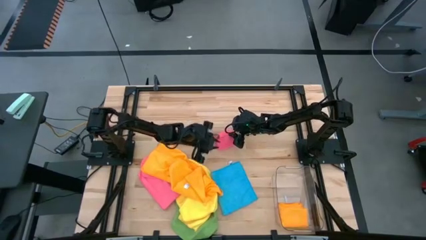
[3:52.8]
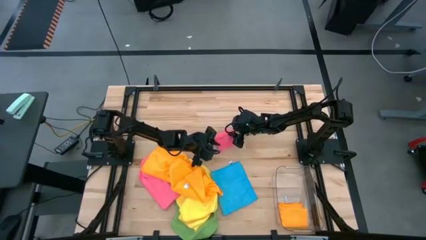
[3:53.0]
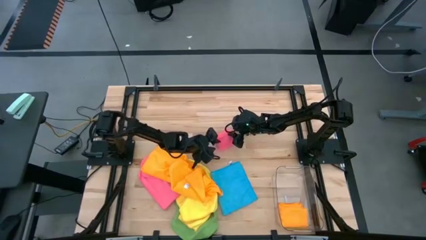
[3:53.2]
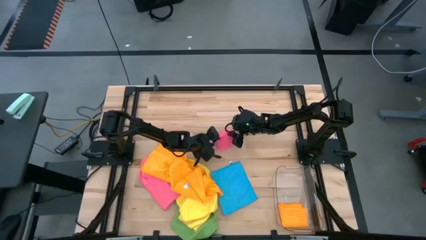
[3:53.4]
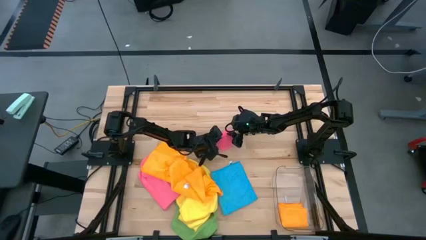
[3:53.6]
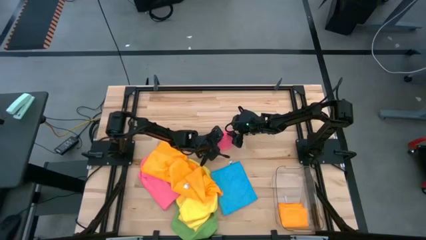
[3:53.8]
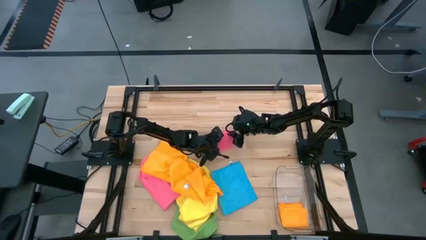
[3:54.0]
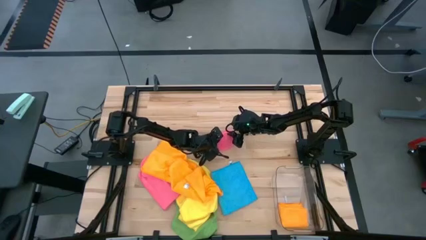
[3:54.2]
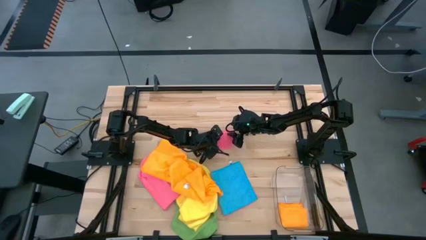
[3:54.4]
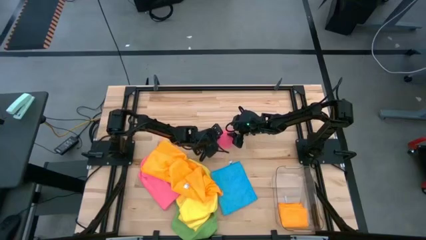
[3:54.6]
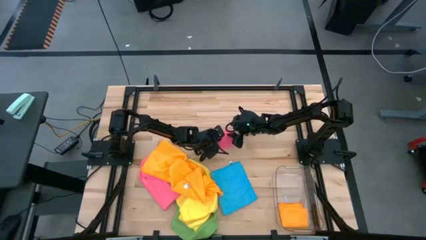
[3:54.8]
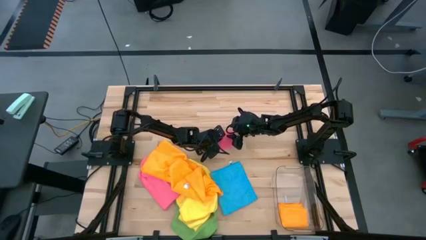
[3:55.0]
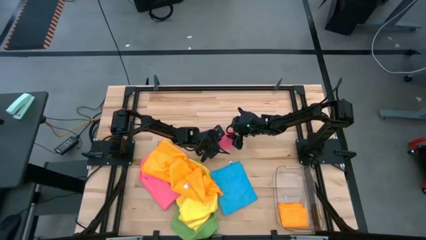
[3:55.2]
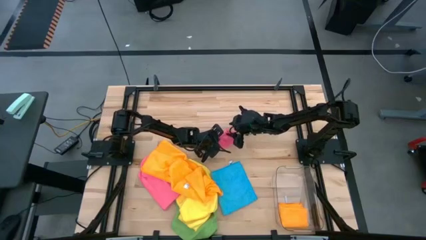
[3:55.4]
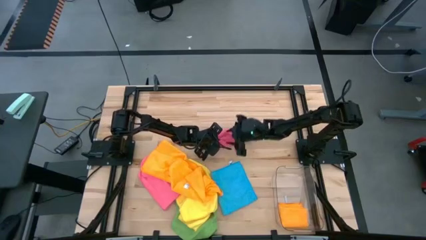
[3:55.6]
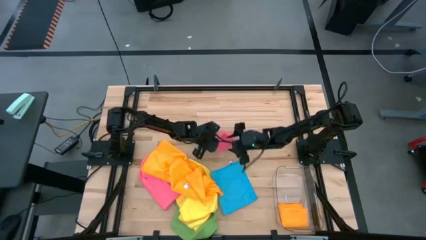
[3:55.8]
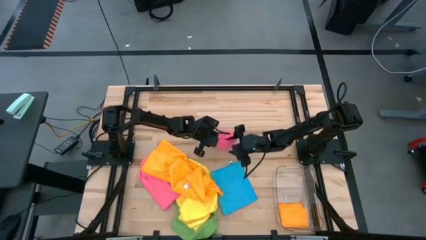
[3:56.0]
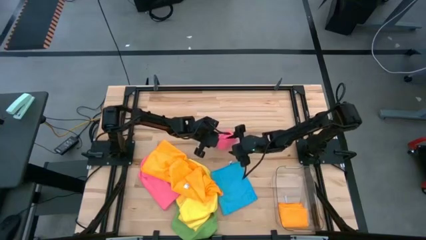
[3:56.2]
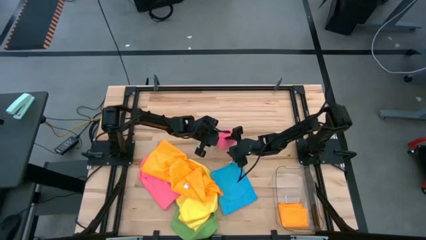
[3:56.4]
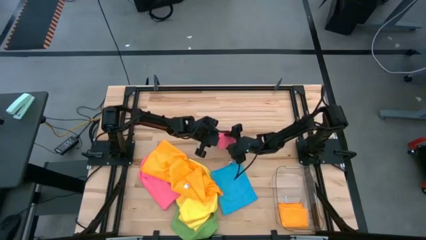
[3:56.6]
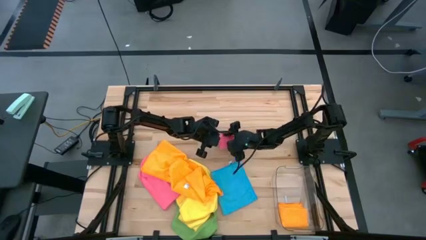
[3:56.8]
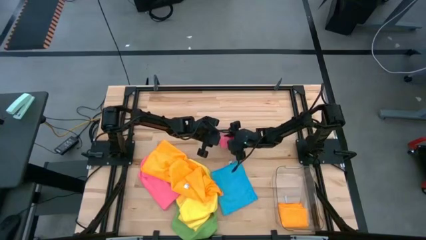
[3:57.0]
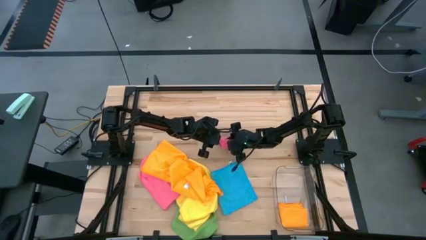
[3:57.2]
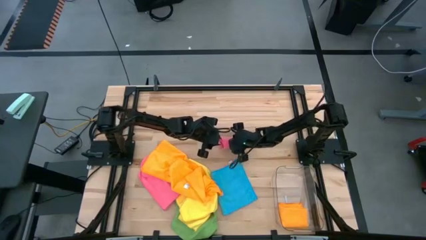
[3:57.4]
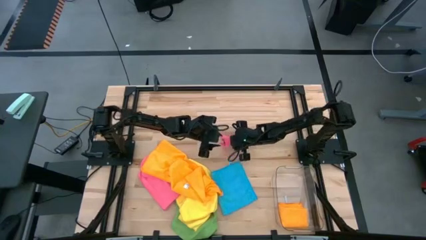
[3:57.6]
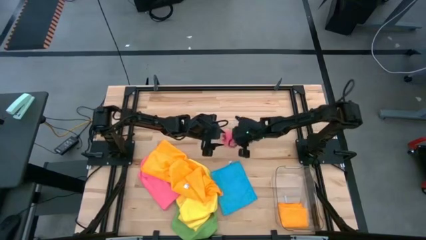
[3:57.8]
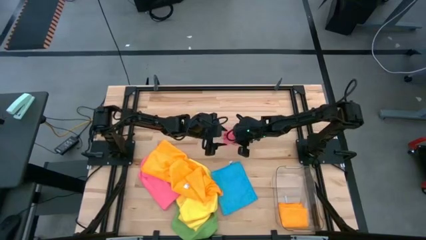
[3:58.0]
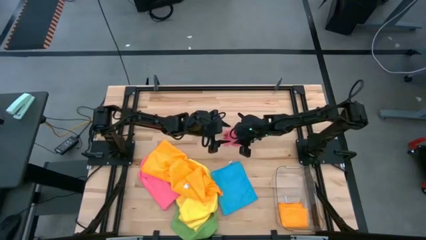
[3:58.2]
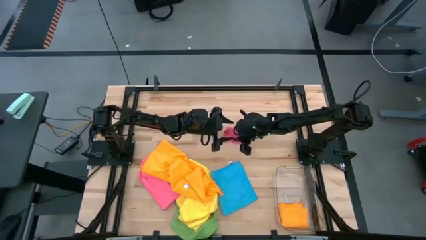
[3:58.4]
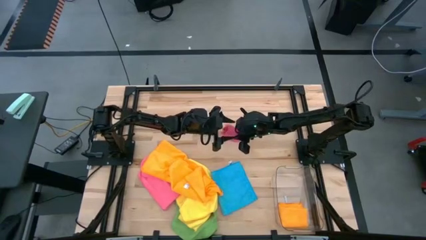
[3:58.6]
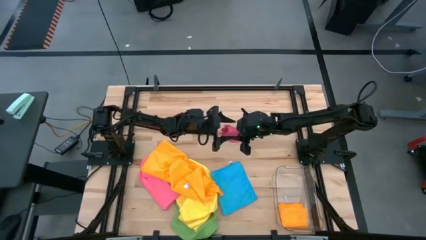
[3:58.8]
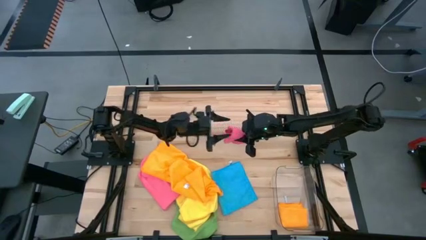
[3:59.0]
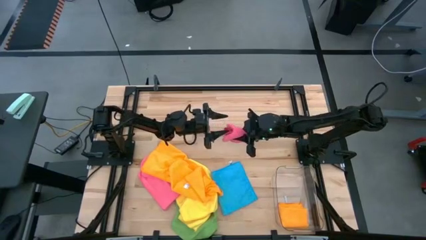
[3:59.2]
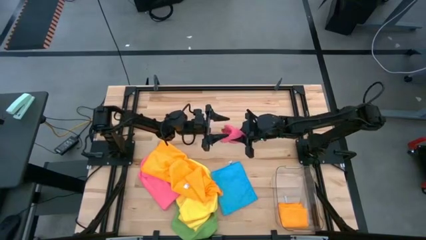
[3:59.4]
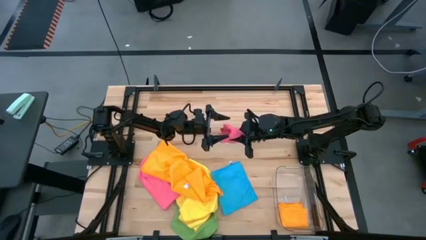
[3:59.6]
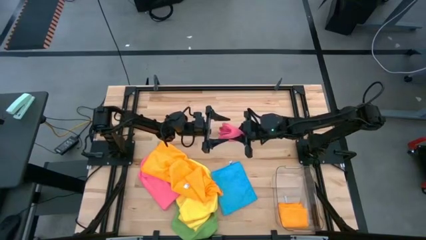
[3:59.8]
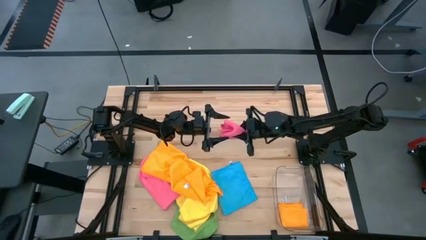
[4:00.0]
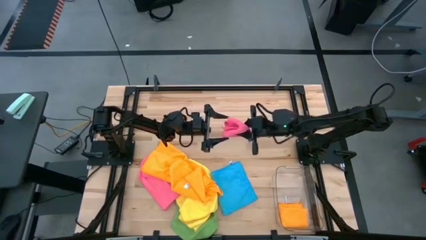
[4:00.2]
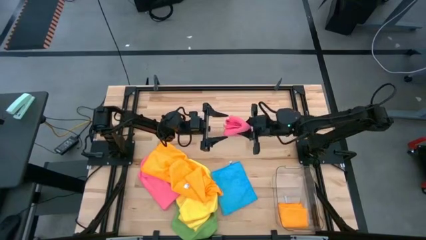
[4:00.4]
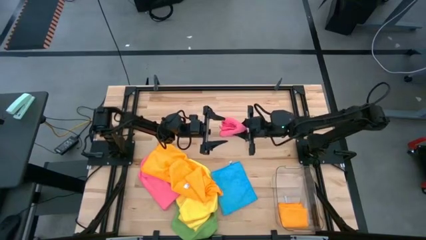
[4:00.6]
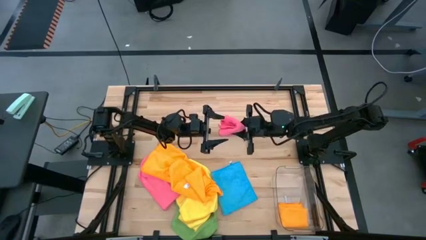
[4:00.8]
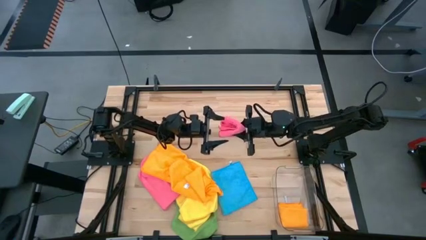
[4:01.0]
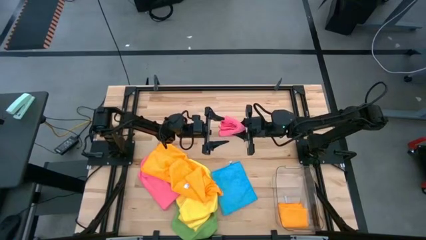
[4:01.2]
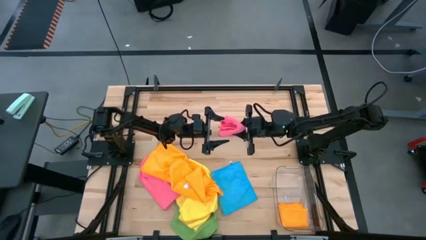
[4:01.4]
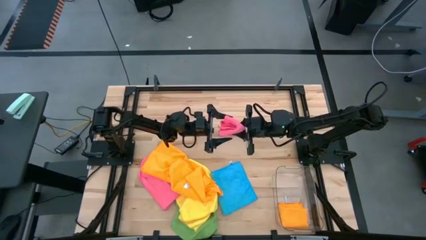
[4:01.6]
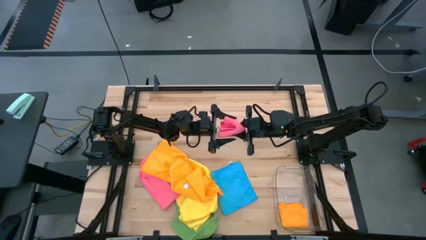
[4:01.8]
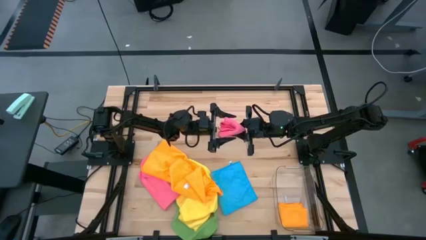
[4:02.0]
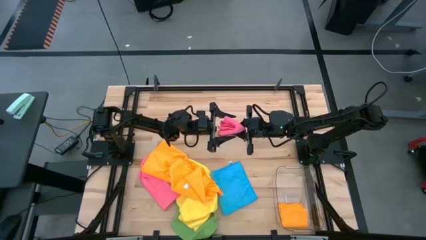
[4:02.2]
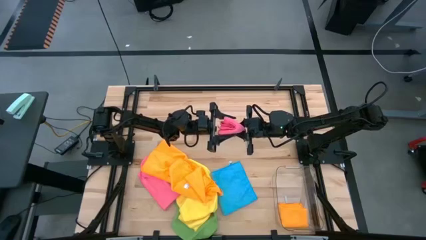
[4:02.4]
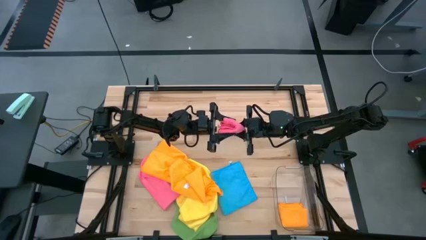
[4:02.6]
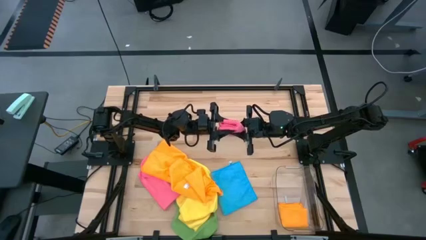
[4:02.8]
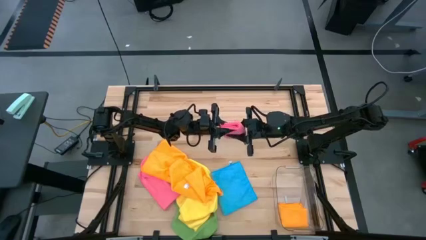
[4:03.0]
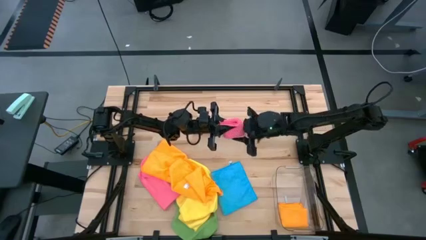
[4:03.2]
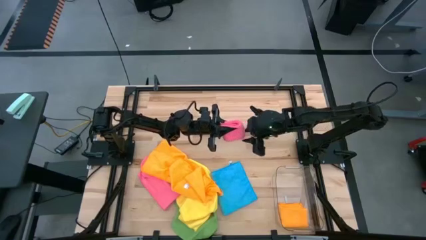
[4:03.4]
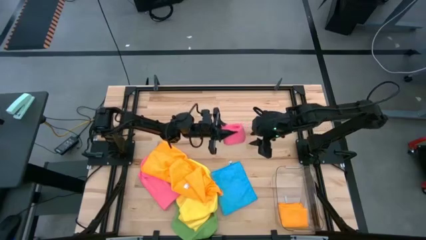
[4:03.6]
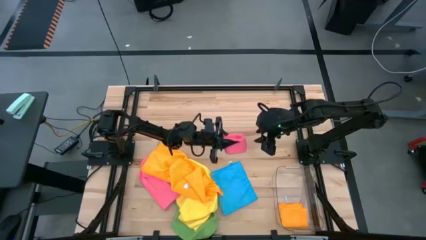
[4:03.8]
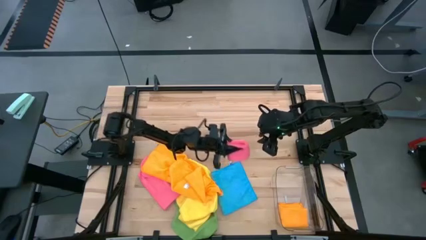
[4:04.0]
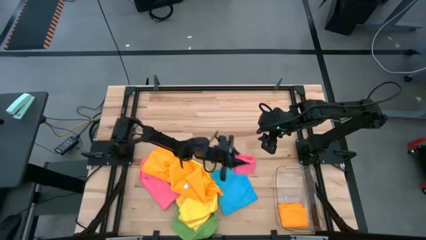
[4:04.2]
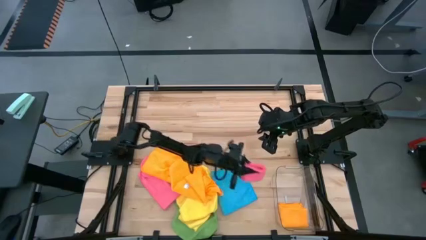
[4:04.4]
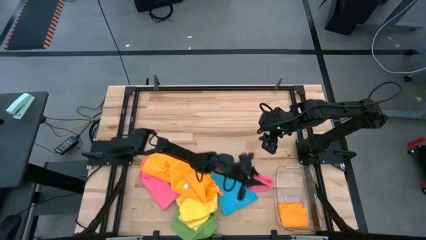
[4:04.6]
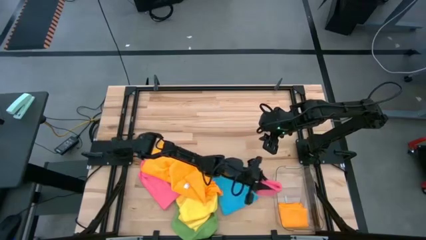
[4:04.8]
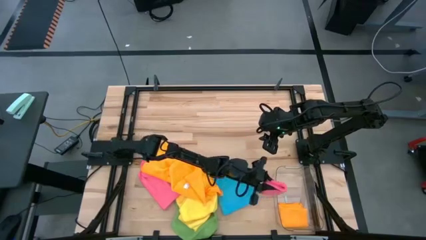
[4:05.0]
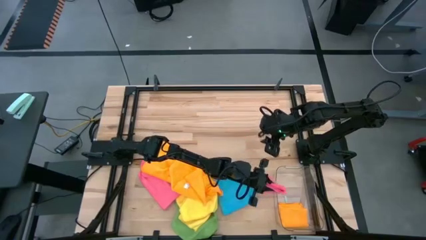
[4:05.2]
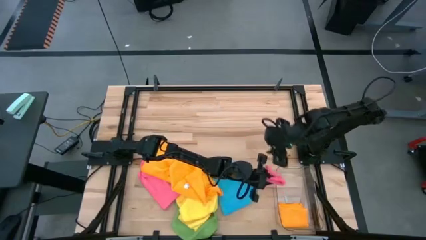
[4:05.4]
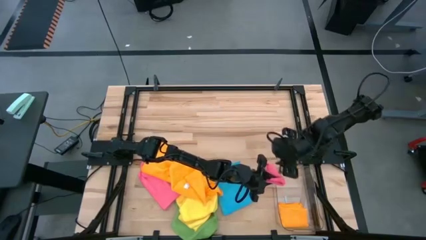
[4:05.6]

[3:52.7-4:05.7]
Task: Fold microfiber towels
Put the folded pink towel into the transparent bin

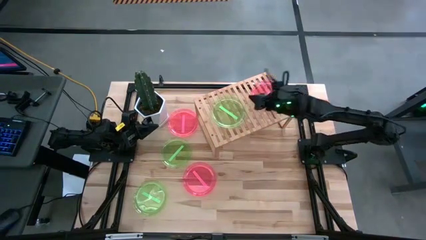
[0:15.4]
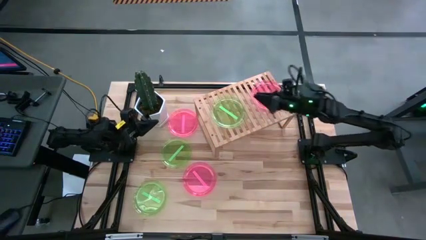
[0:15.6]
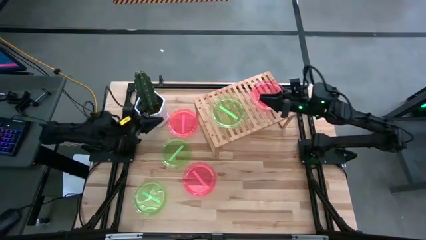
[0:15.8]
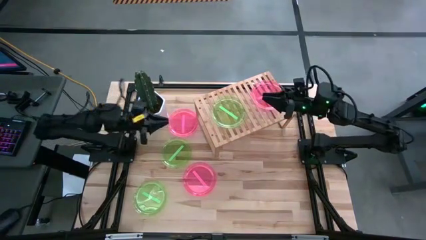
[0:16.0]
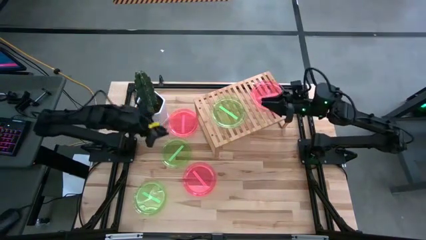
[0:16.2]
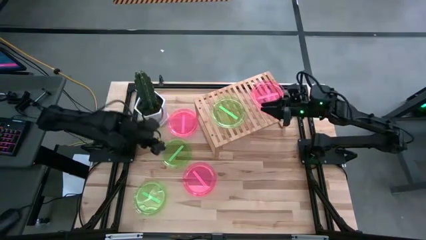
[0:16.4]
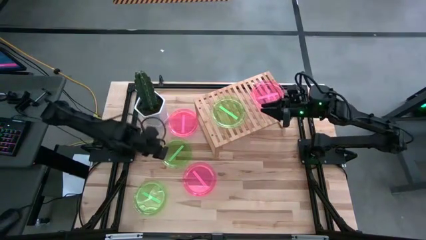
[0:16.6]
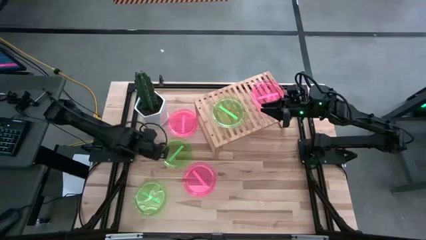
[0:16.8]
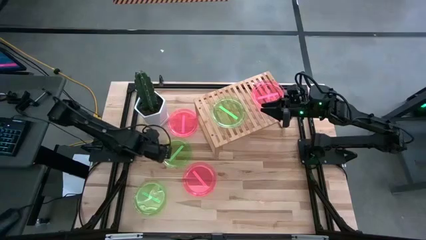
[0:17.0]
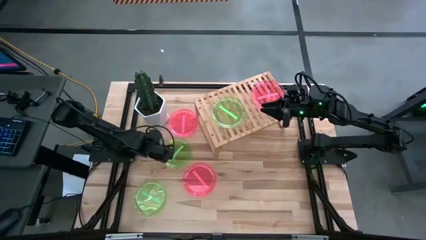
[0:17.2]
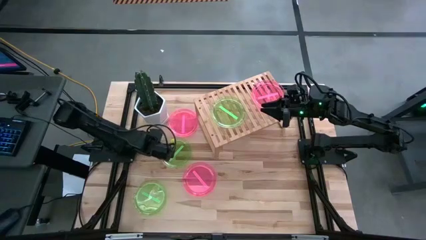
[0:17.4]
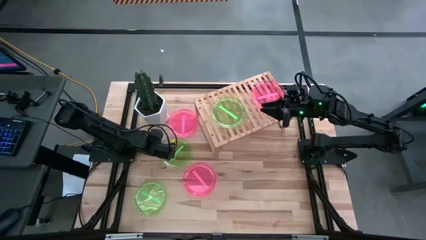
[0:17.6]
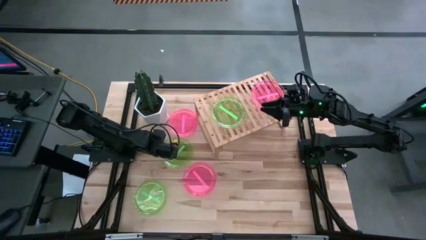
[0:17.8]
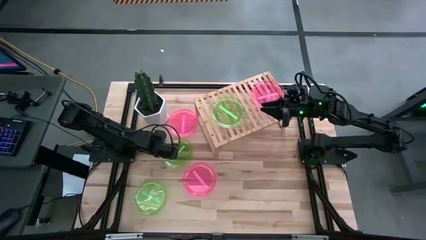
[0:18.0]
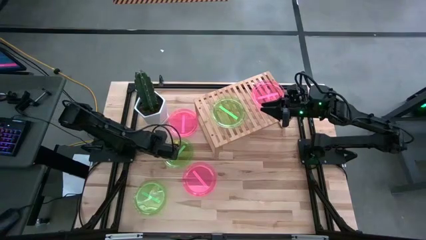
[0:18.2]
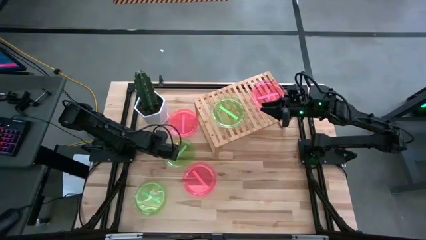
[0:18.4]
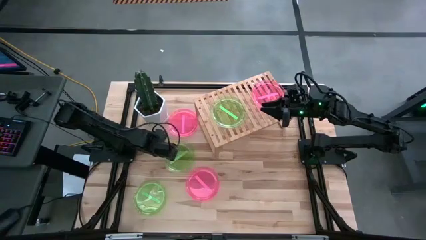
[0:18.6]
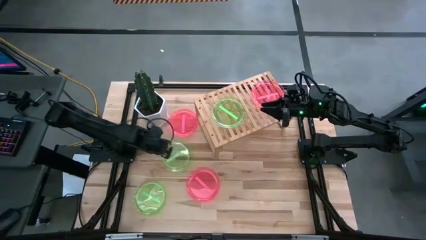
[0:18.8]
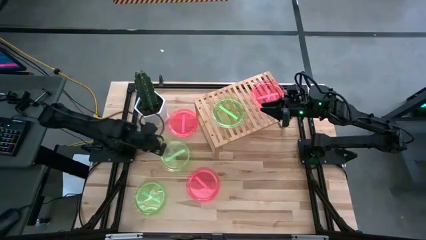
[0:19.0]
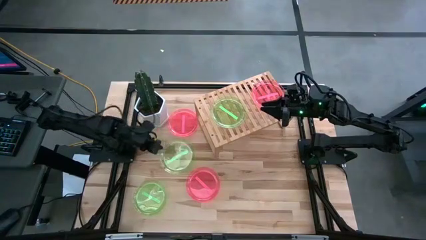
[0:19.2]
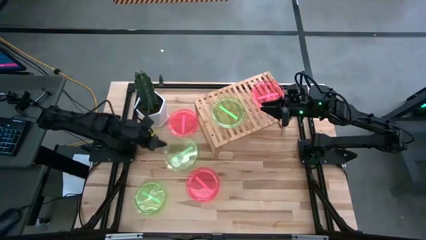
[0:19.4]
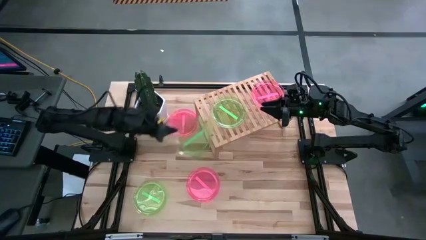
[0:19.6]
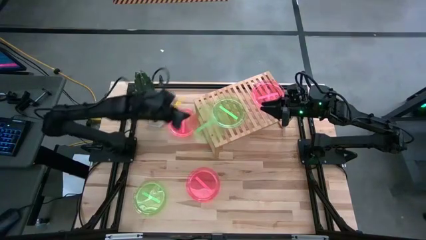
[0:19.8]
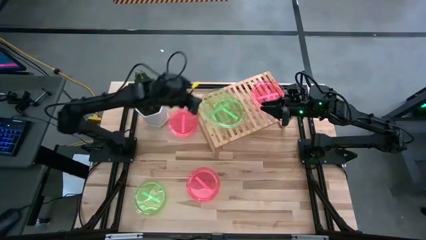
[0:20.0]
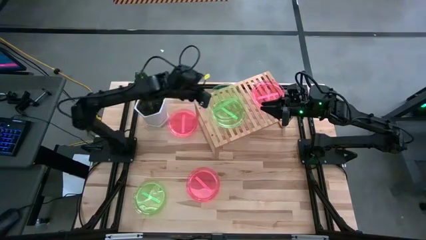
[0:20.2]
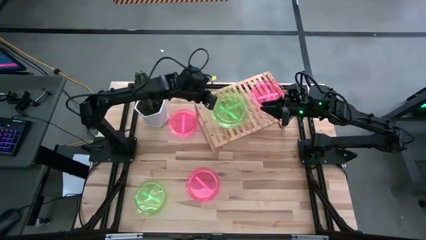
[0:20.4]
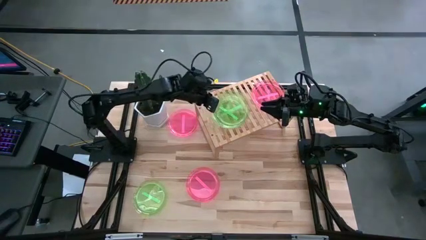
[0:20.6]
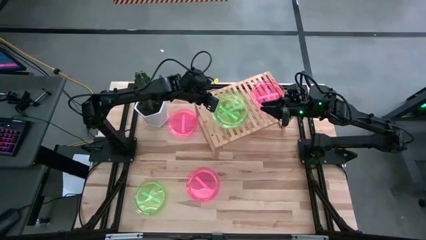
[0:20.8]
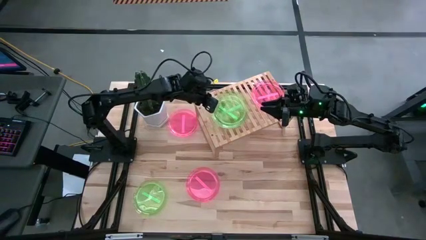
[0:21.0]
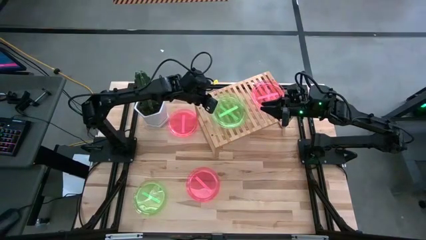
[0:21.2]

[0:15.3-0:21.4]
Task: Place and stack plates onto a shelf
Stack the top green plate on top of the other green plate on the shelf
